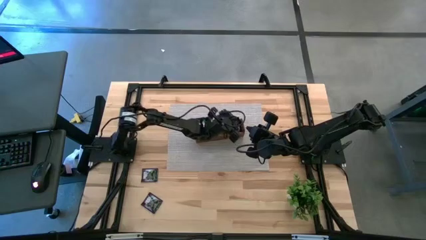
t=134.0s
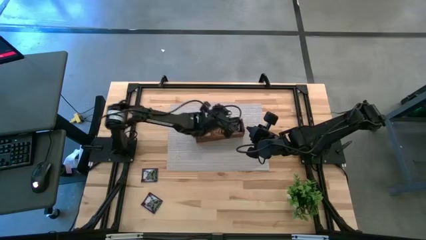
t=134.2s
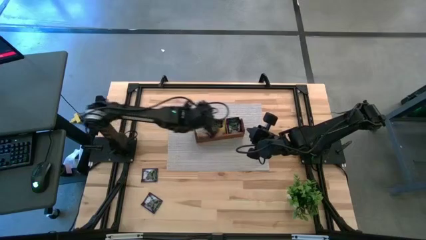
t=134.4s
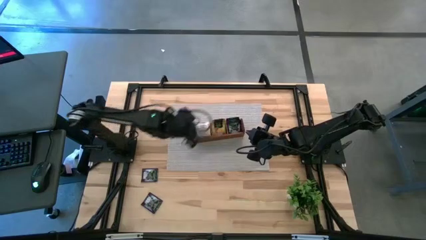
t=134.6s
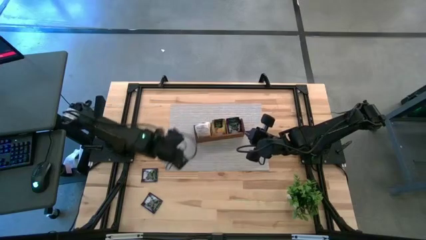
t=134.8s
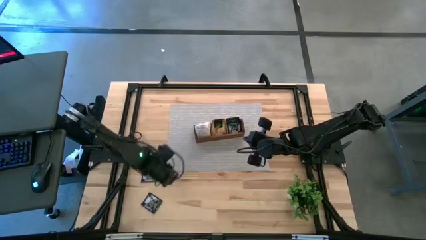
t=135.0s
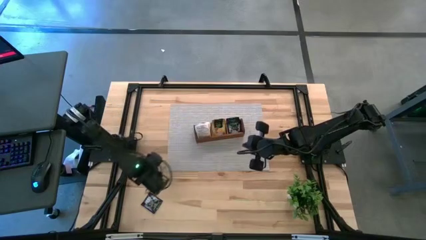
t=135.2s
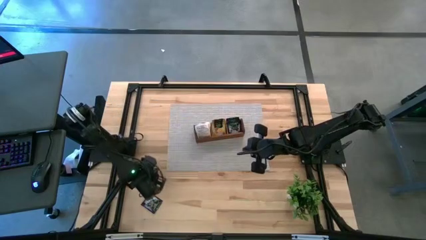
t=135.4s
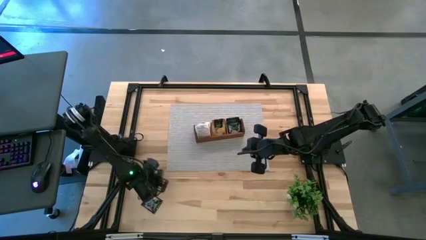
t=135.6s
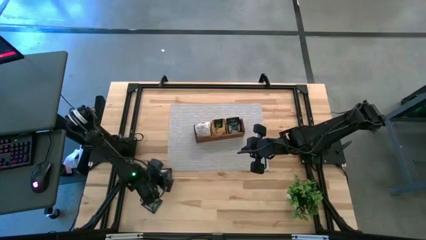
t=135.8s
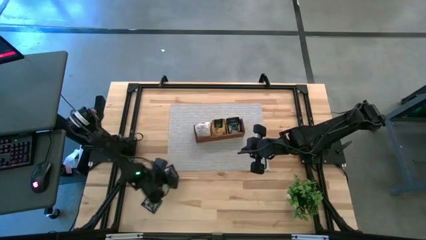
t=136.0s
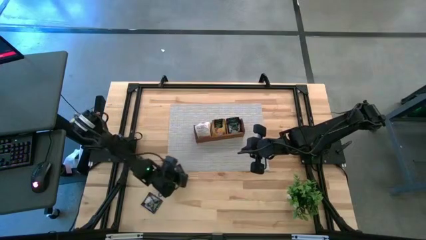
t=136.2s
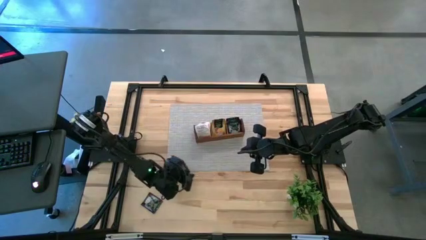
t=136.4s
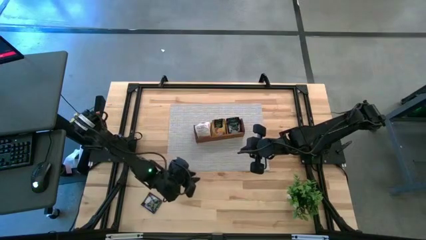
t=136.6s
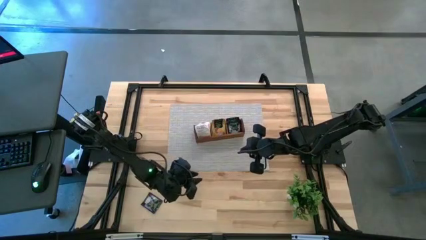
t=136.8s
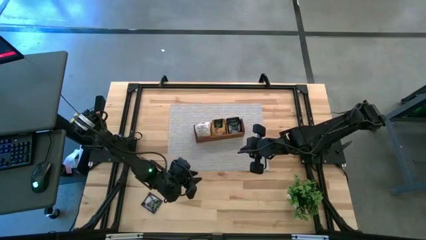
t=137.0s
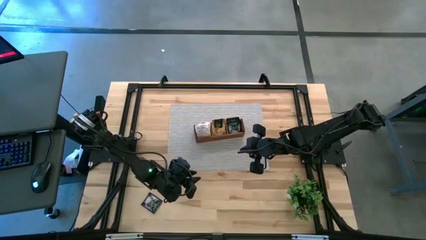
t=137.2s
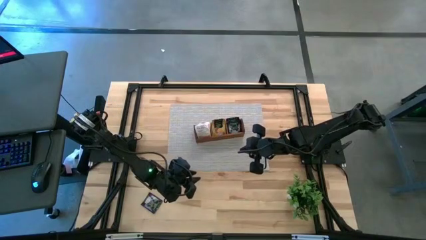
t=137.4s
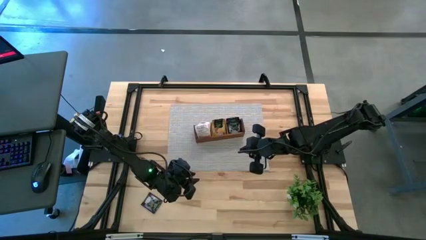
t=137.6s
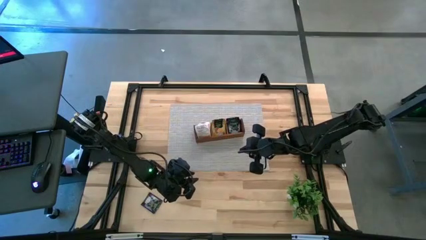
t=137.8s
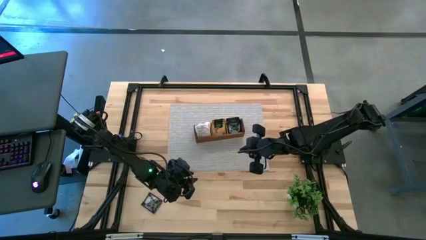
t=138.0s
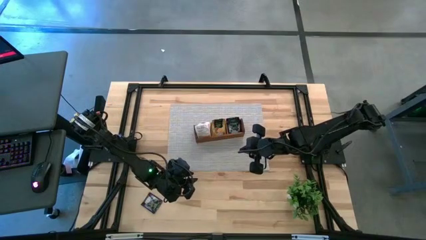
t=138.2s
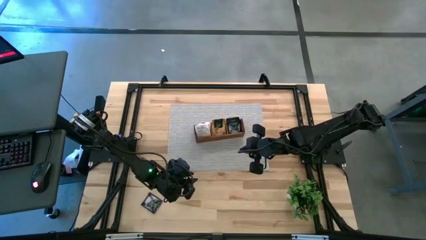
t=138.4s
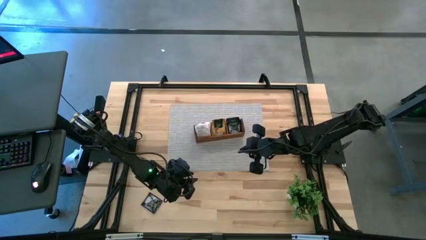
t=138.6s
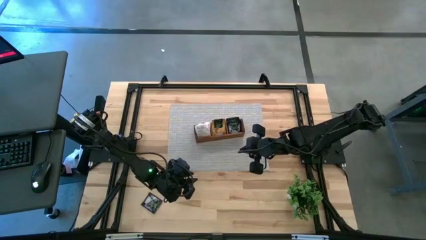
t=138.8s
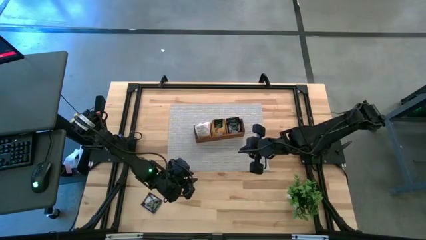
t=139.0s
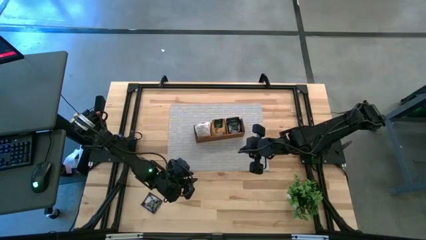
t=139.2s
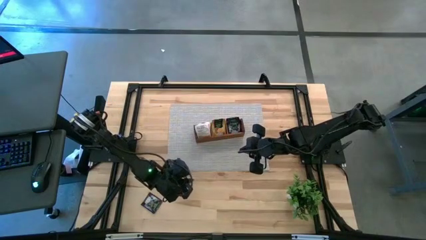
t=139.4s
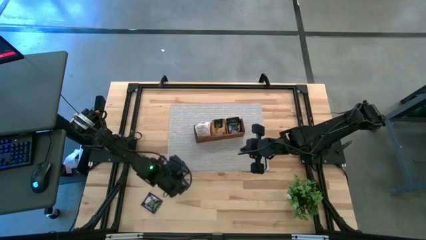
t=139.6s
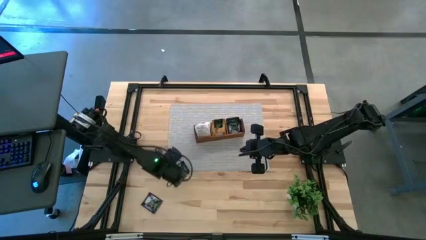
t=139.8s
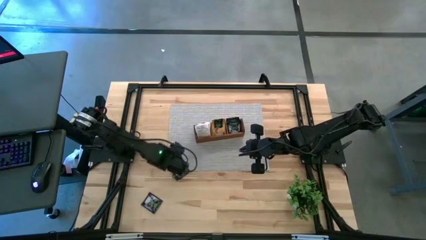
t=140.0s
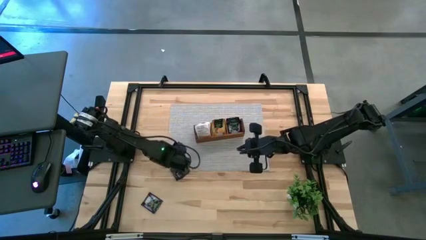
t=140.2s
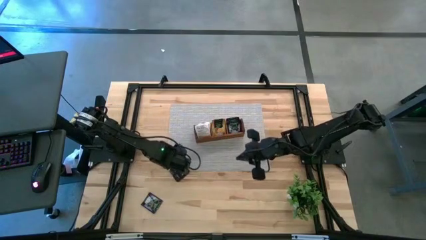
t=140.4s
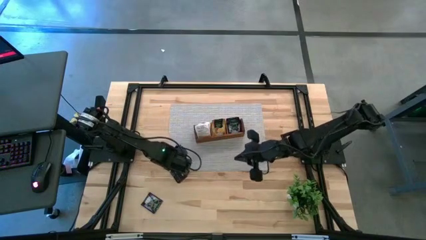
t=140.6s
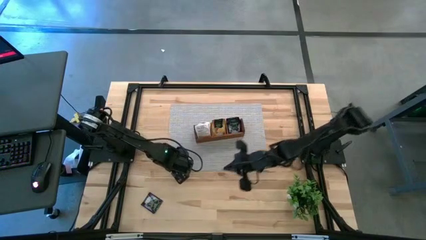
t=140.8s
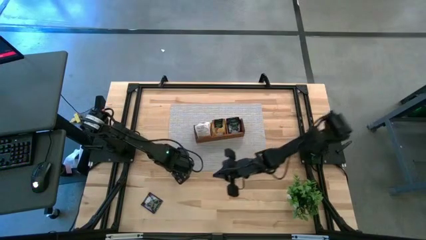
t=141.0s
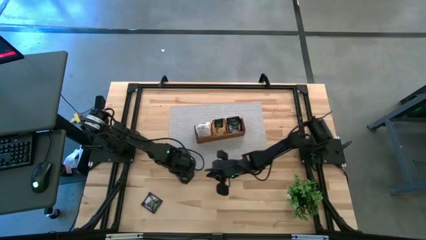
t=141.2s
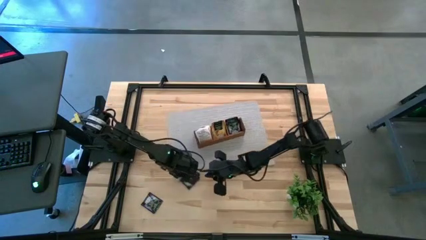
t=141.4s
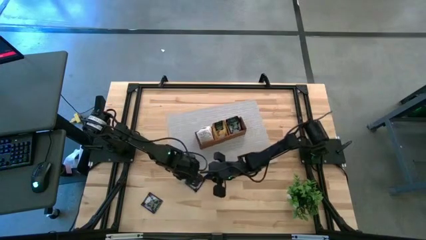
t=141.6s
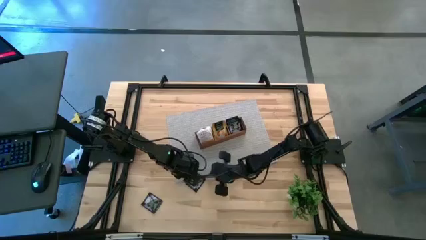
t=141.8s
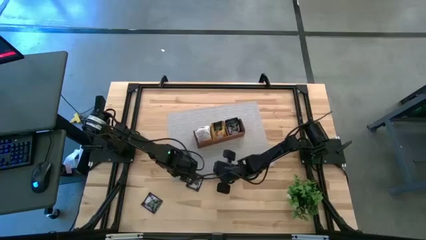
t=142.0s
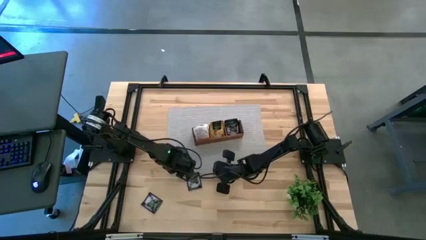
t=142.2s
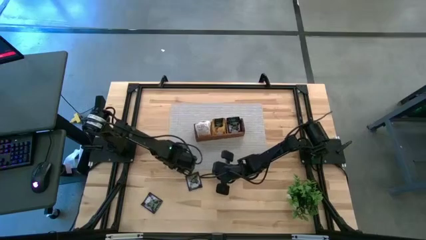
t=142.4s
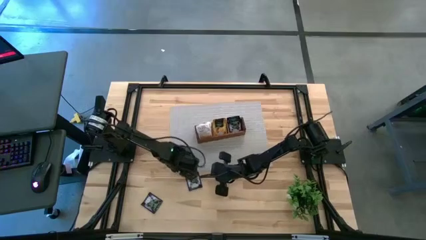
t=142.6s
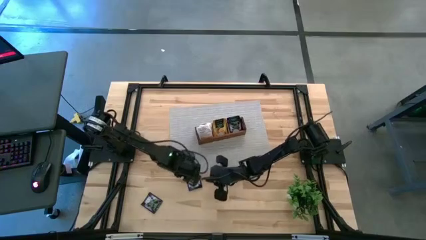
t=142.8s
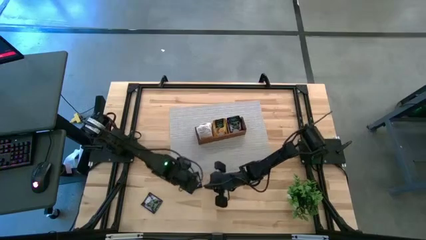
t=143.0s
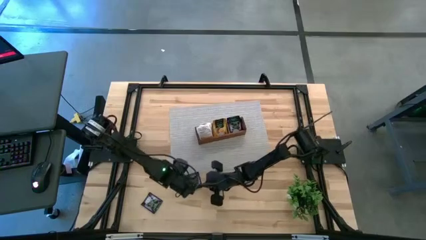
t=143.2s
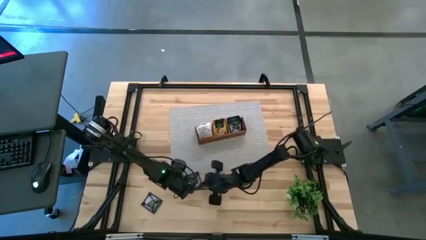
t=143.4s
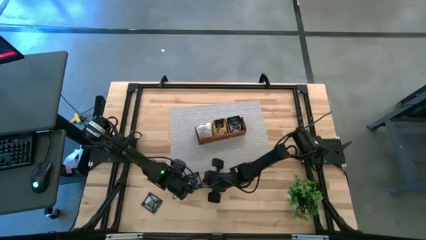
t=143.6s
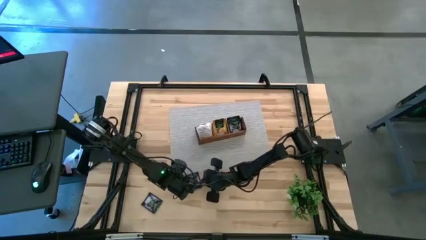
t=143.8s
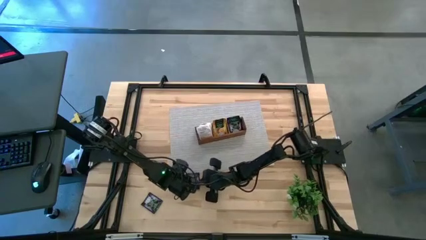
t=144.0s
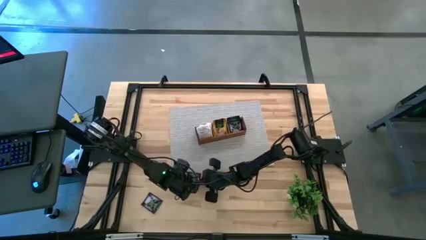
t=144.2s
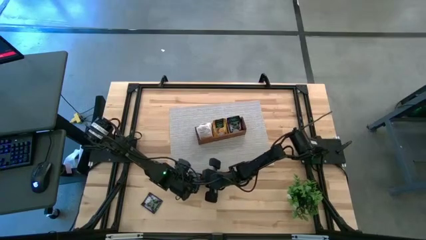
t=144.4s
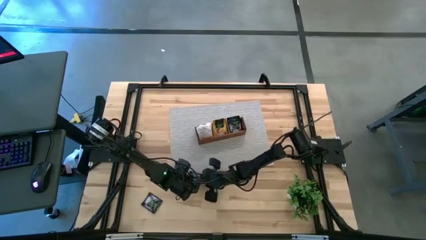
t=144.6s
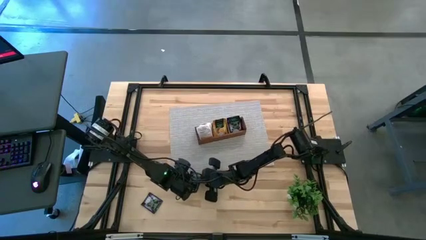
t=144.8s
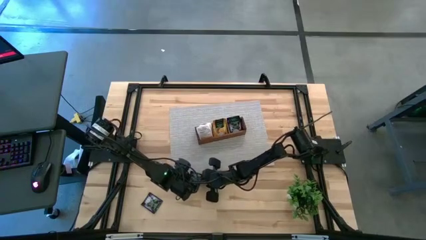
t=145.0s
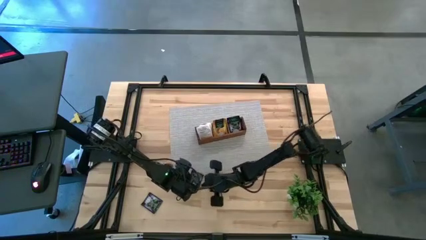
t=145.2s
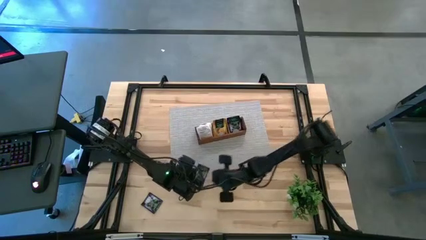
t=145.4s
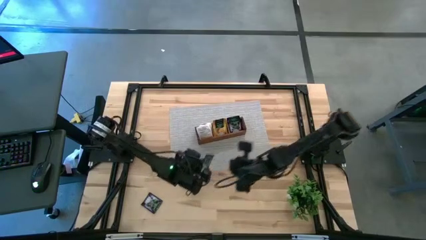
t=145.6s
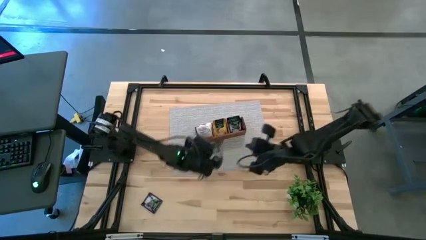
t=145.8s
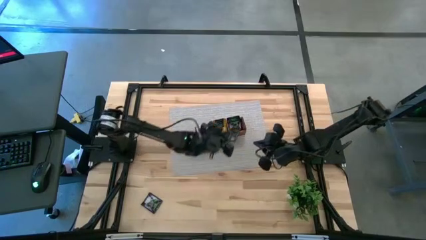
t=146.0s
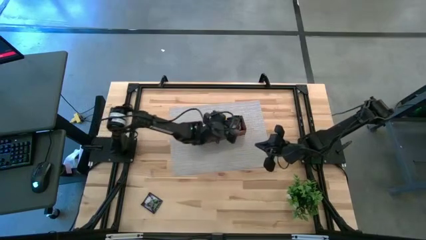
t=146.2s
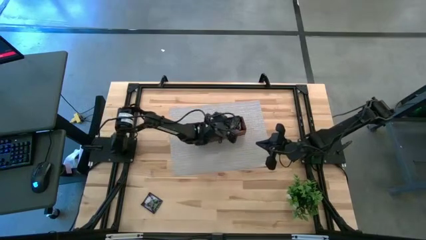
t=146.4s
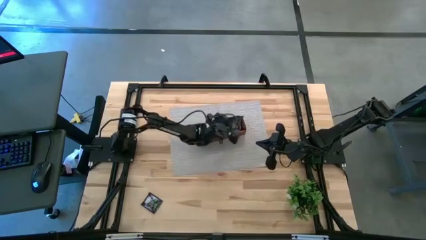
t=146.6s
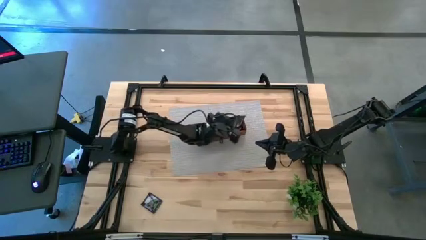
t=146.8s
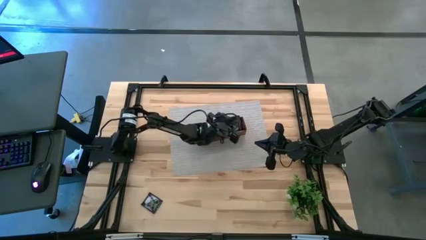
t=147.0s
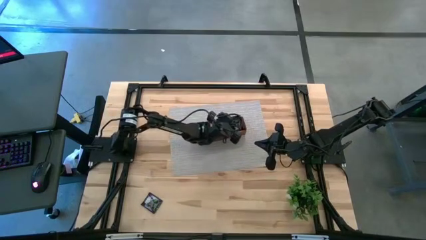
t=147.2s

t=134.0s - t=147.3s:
Task: Pick & Place Tea
Put the violet tea bag into the right section of the wooden organizer

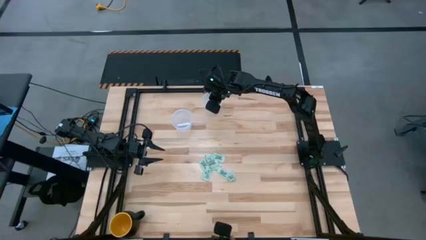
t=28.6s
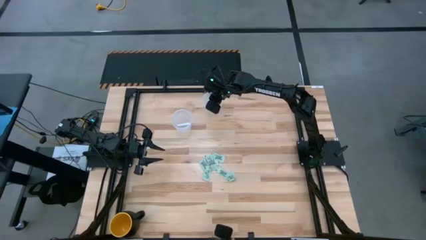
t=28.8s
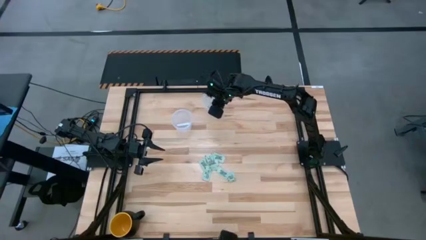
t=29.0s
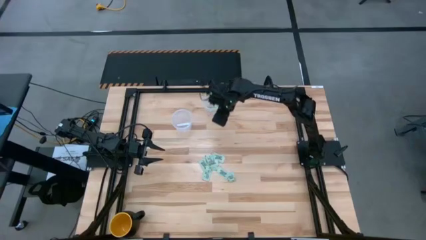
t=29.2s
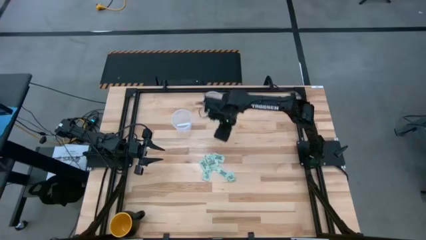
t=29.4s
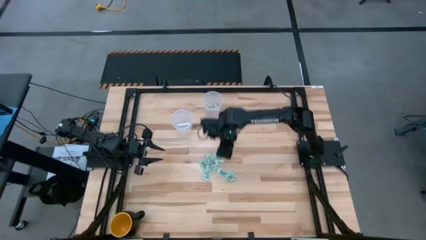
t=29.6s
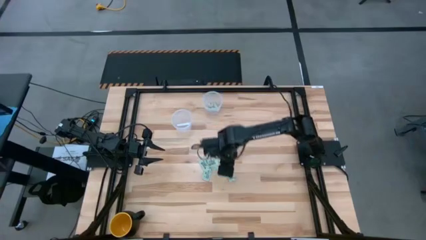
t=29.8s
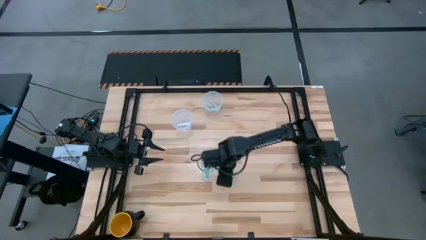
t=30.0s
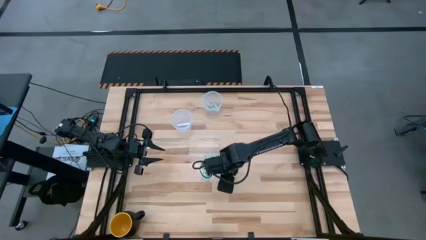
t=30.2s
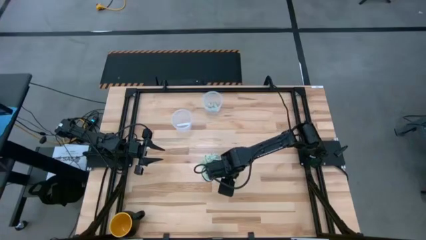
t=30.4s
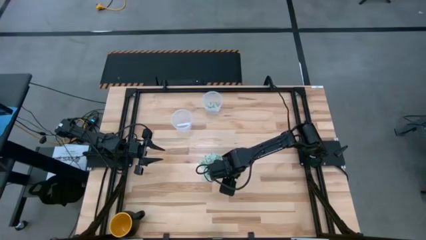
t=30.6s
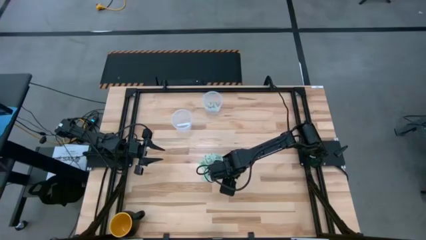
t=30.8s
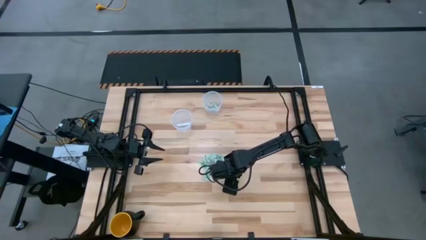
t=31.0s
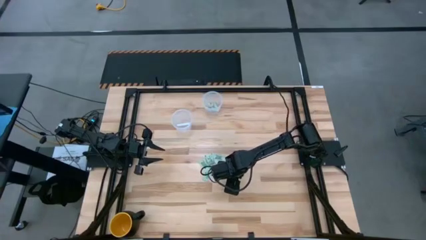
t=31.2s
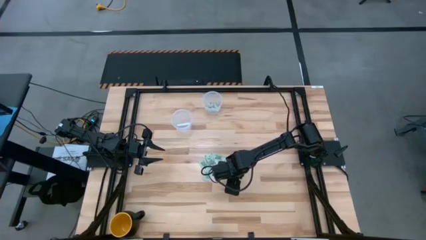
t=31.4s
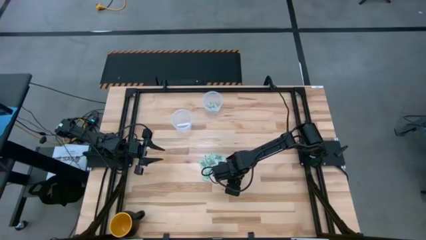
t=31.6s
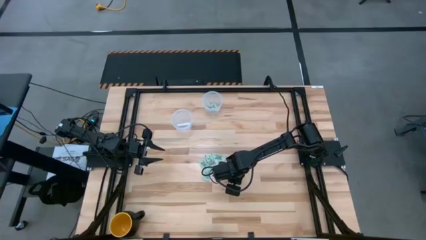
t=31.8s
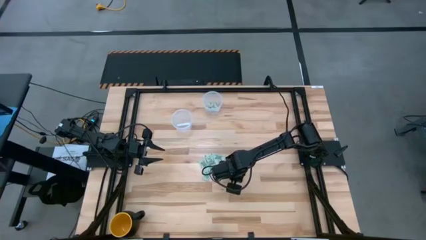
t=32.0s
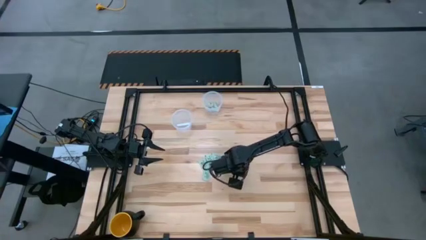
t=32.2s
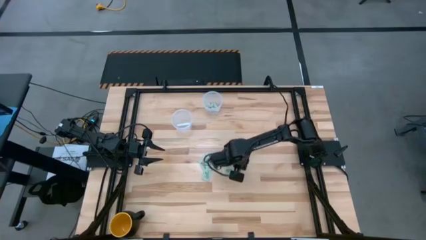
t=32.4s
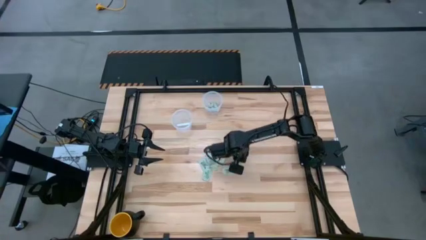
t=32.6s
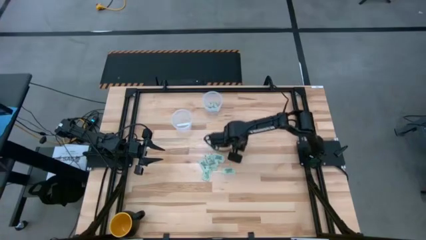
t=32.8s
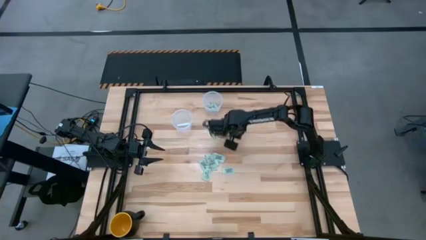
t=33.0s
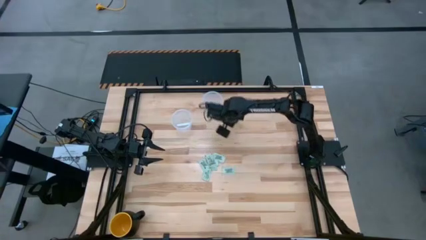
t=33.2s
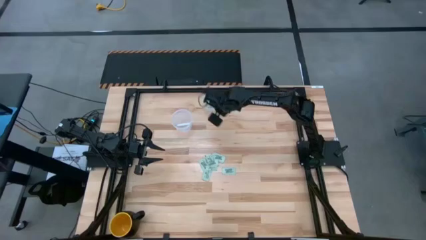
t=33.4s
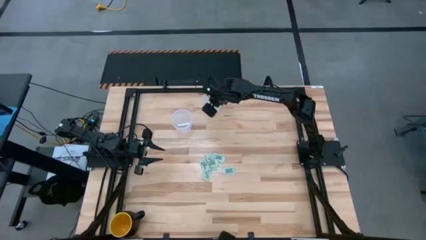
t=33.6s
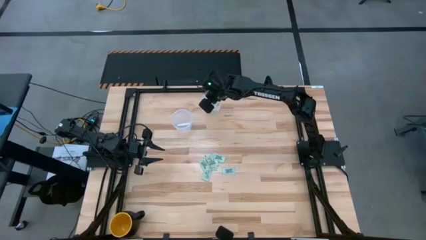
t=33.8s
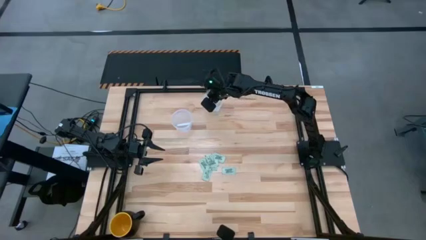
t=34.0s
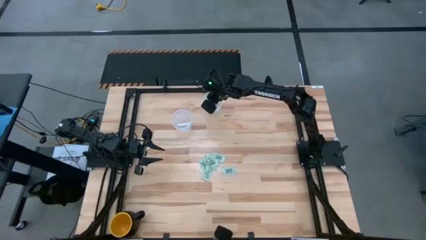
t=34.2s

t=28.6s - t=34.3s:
Task: Pick and place items into bin
Put the stevia packet into the top transparent bin
